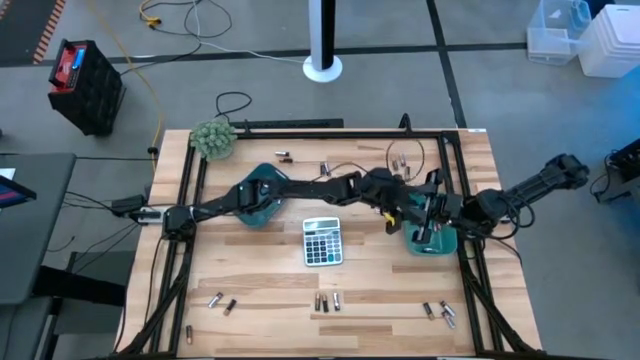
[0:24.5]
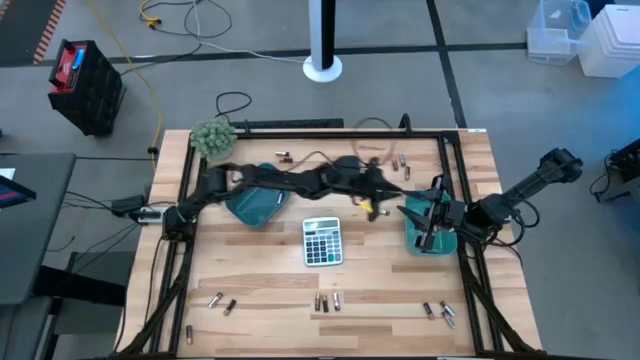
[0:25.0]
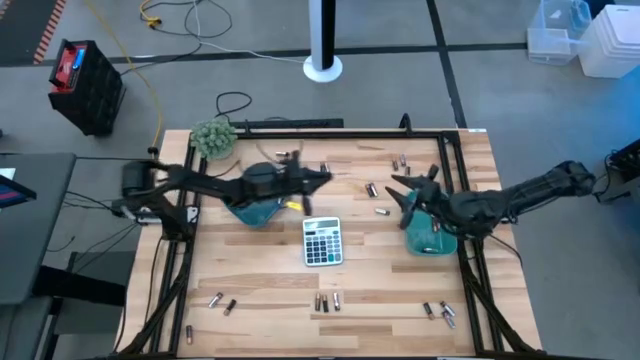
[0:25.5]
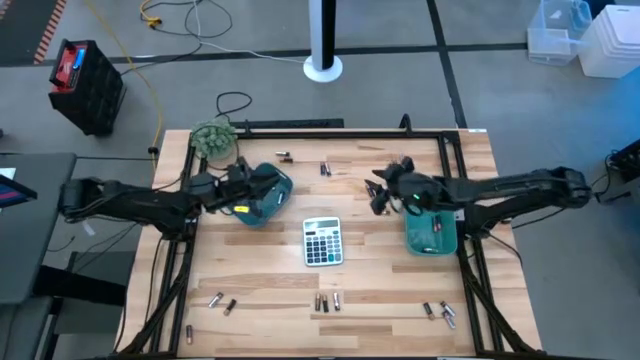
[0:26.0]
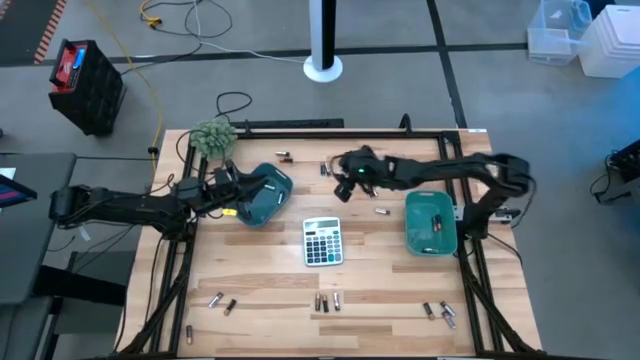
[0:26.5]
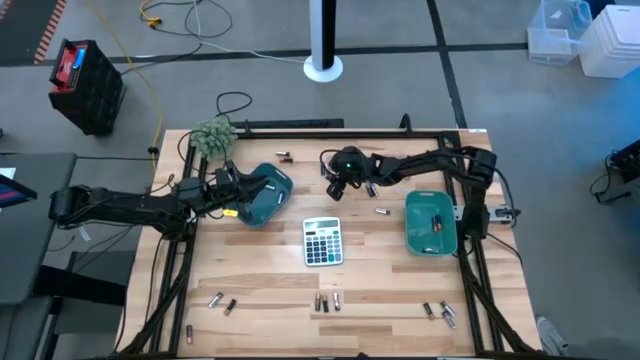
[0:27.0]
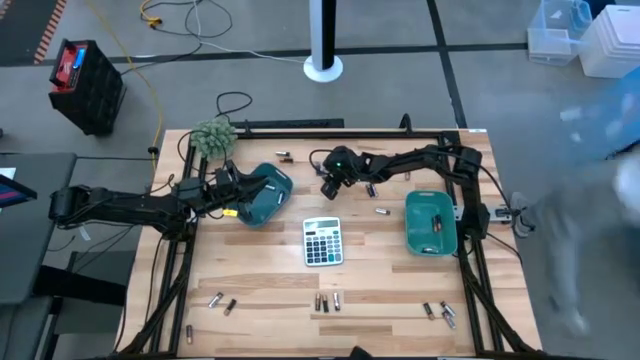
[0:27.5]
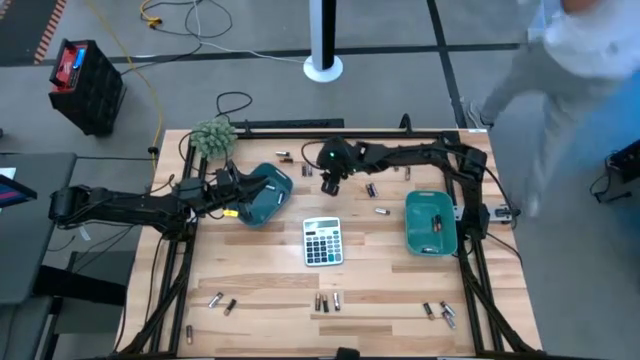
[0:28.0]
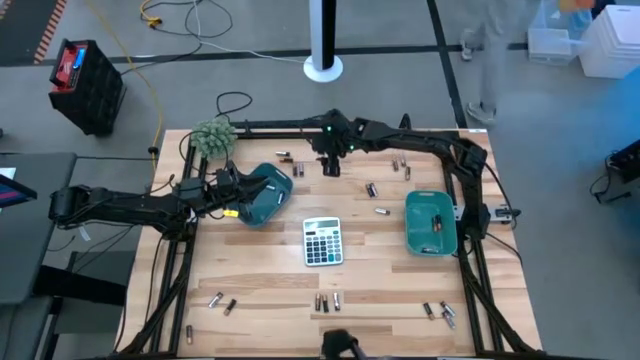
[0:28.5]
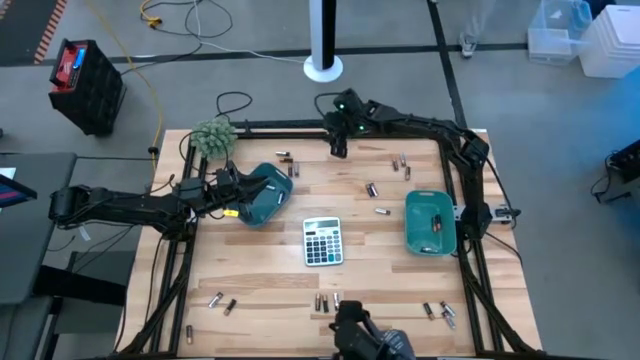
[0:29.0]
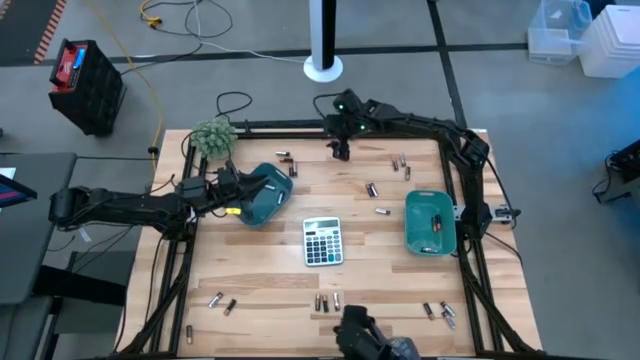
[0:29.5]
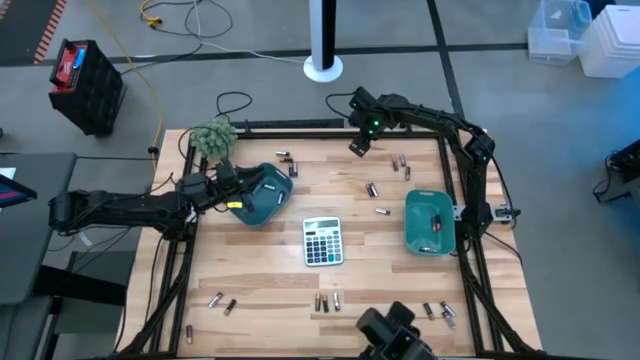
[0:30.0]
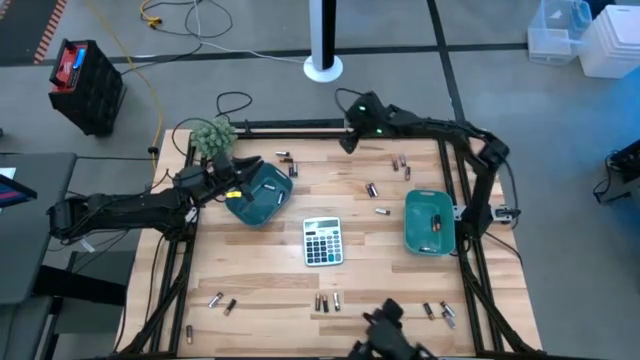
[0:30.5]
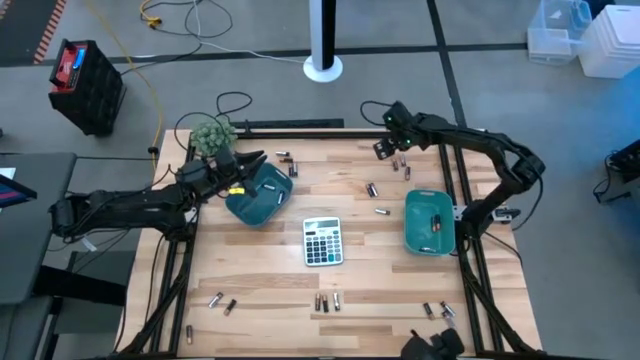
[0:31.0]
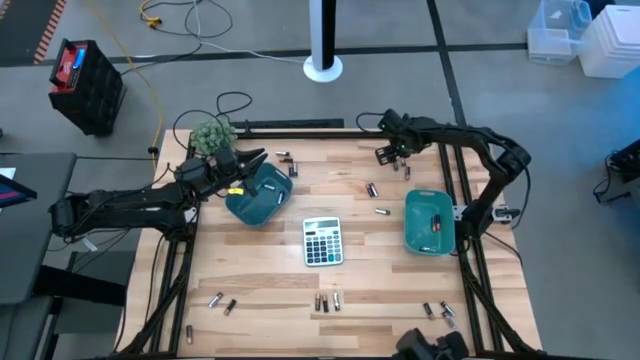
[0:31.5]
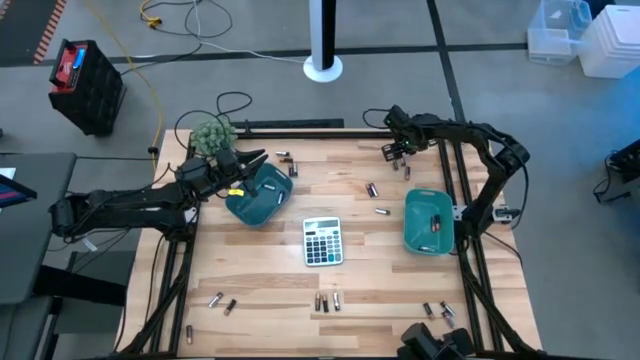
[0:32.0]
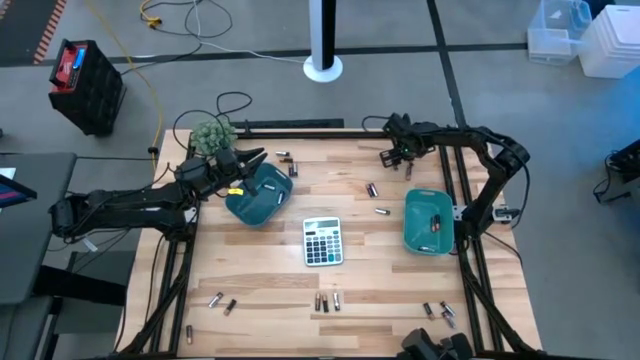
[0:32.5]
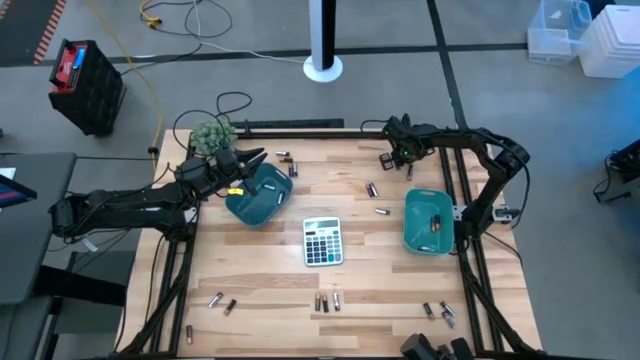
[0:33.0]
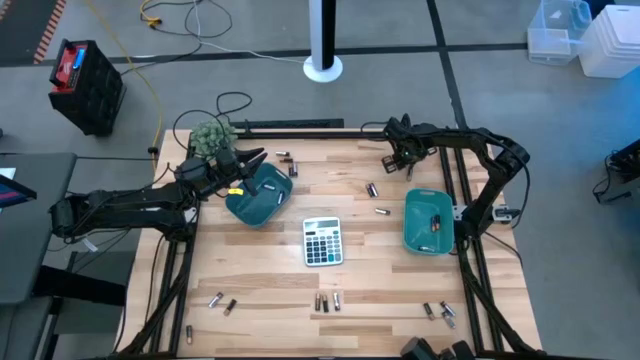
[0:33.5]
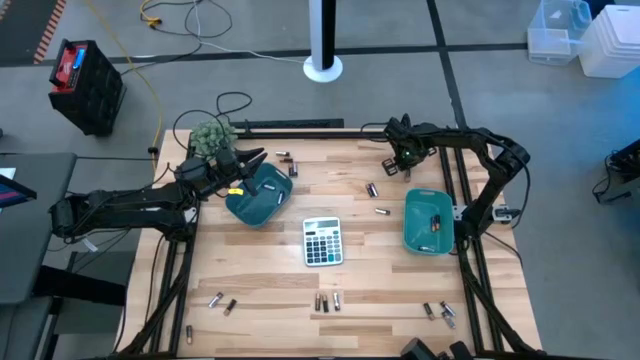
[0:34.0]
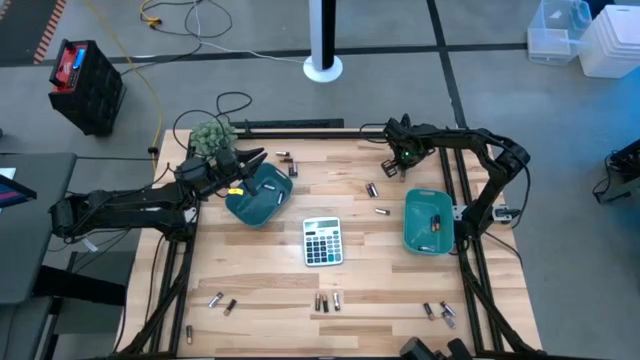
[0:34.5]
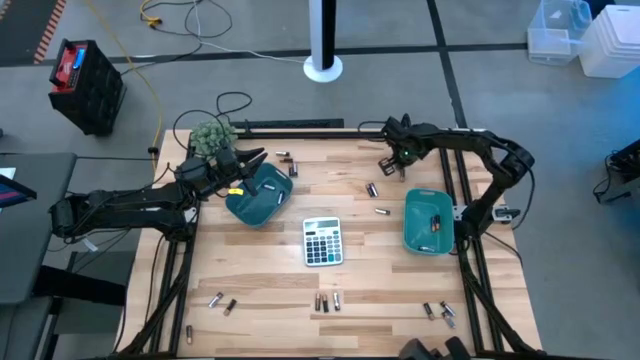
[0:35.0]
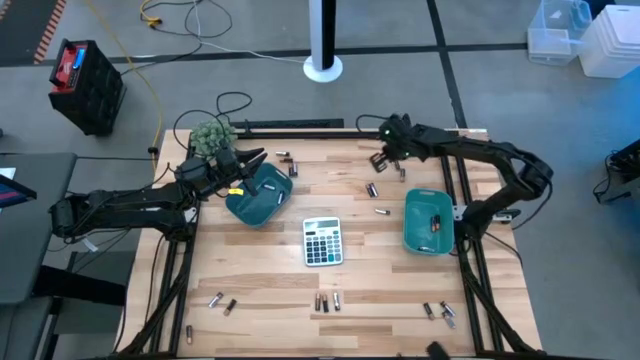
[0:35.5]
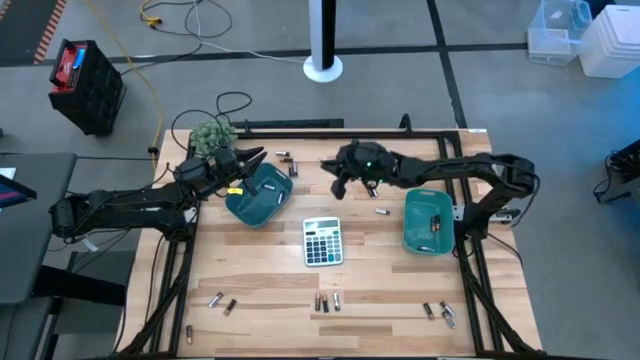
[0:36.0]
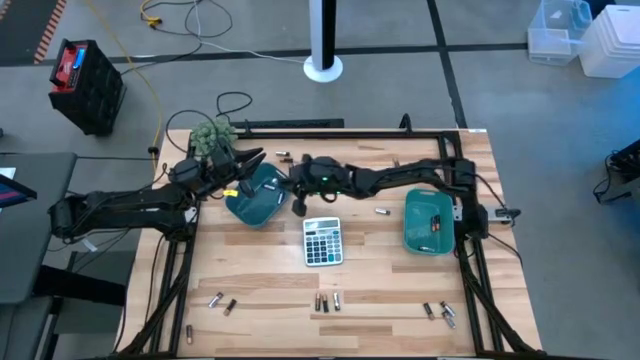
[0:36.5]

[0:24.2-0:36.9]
Task: Sort batteries
Put the silver/black battery into the blue bin

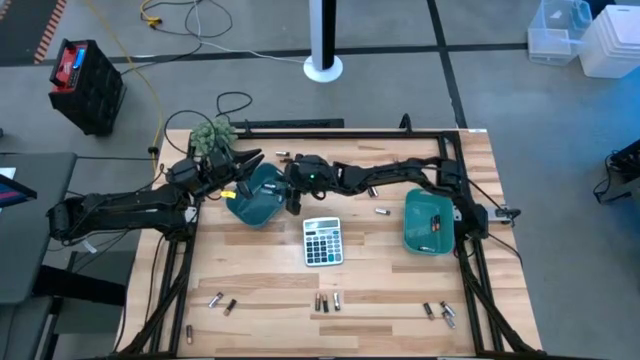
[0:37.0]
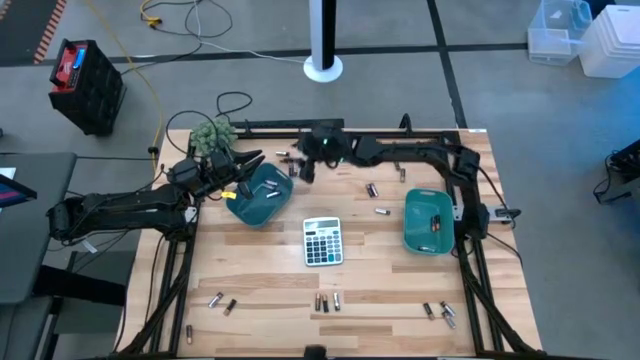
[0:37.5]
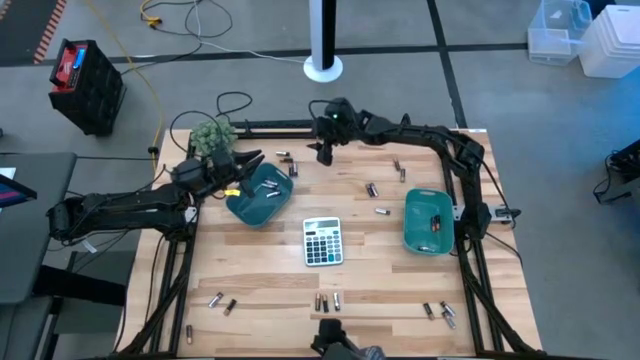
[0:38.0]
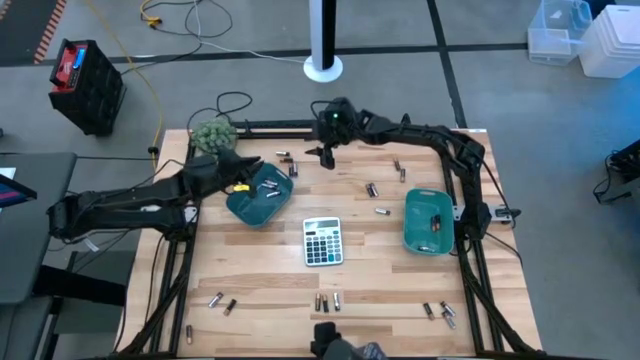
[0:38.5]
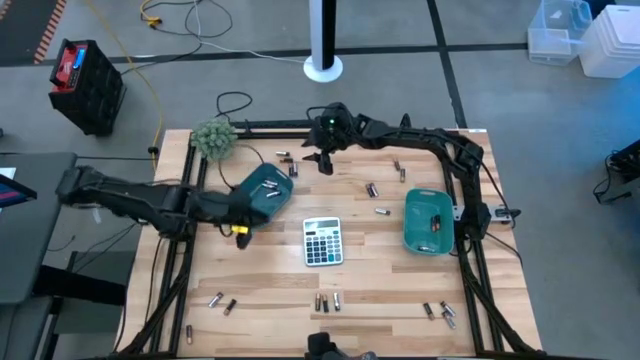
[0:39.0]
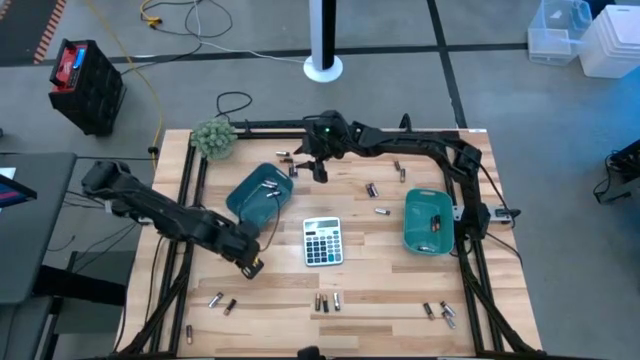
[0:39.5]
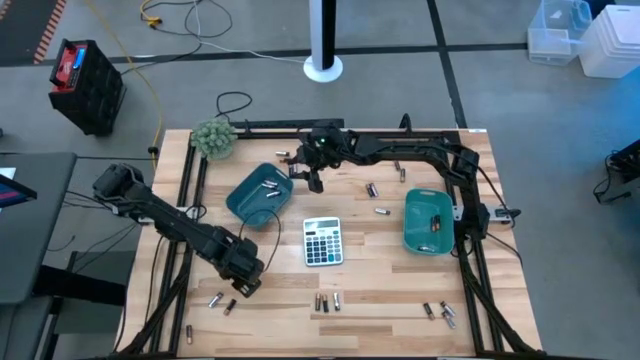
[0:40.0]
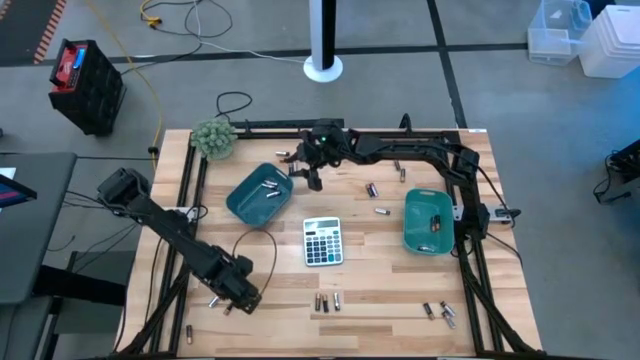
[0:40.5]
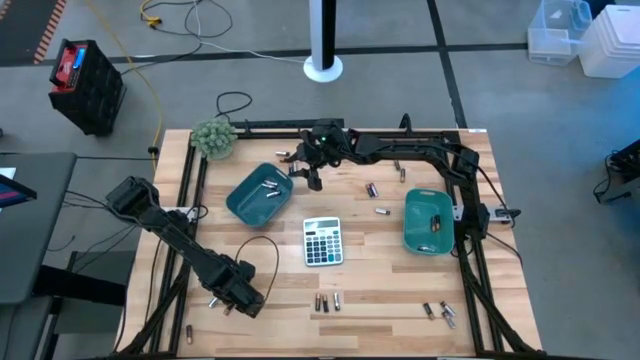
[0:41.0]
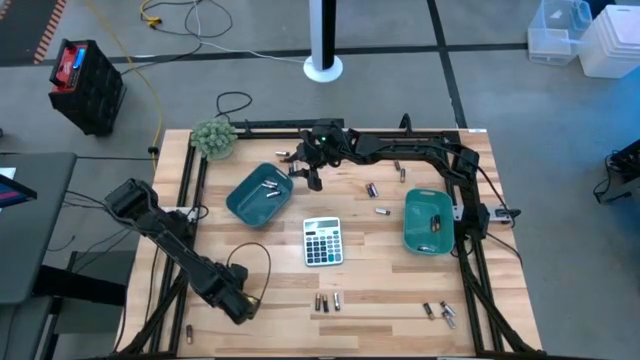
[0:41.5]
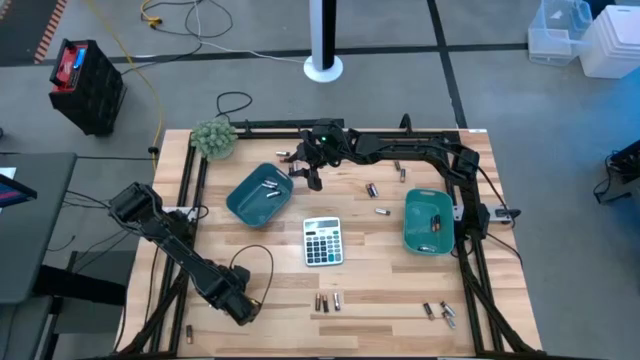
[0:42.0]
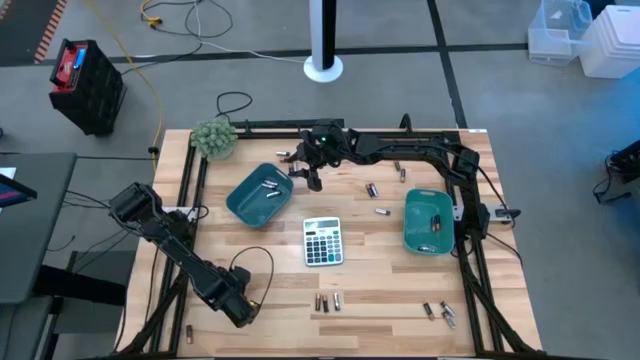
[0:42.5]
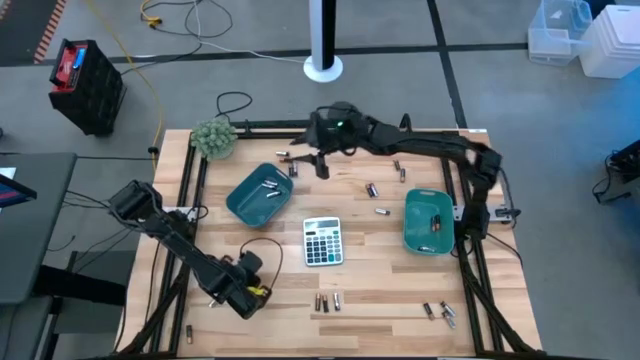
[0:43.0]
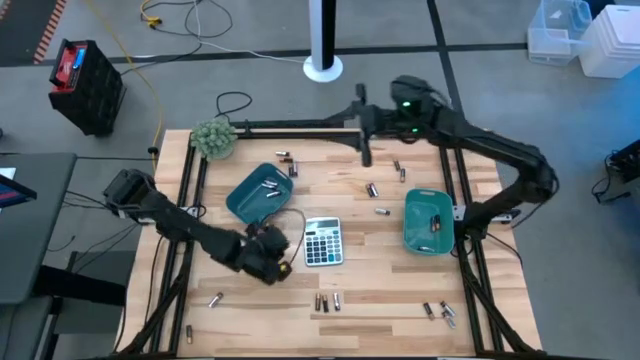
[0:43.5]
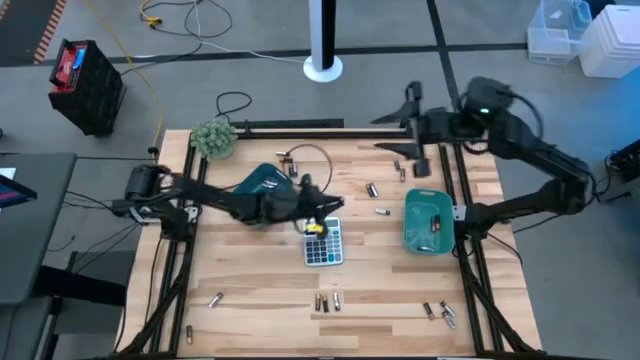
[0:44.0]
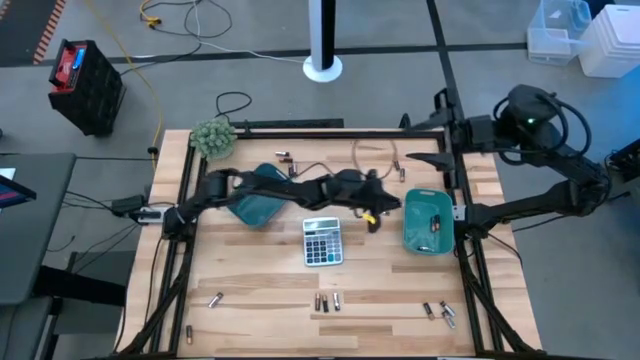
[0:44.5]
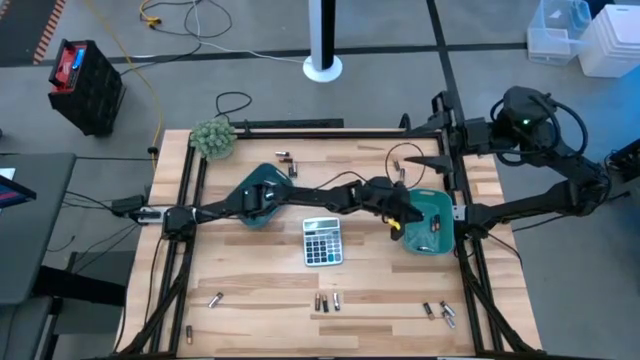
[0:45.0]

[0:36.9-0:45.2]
Put the brown/black battery into the green bin
